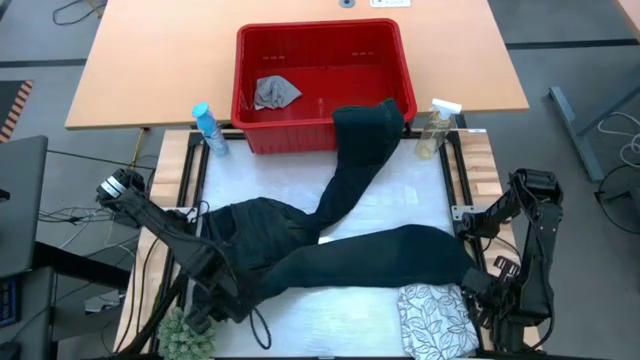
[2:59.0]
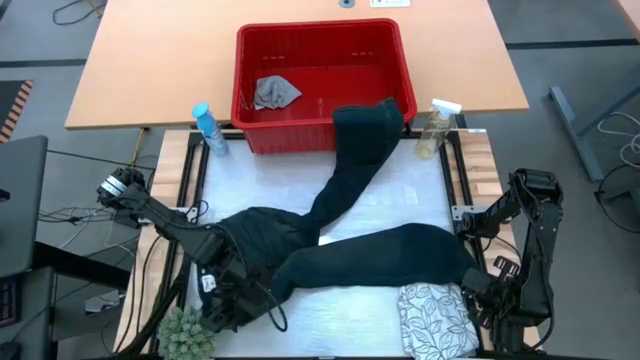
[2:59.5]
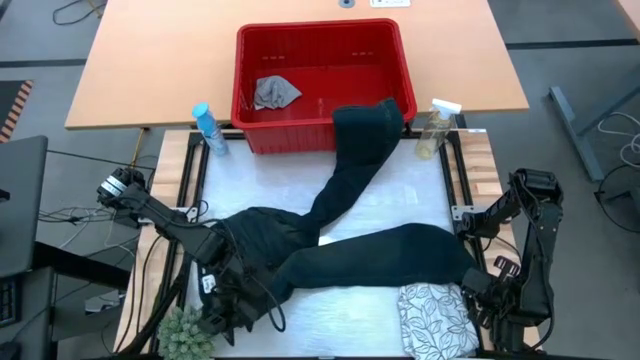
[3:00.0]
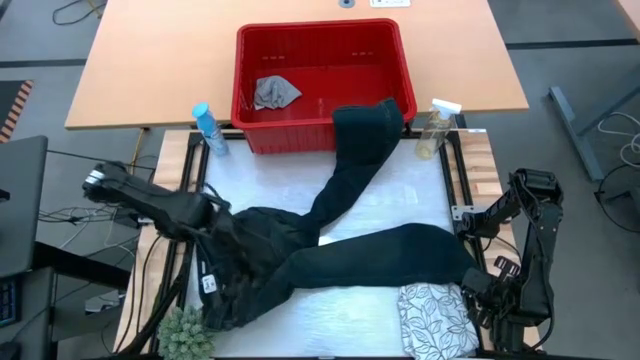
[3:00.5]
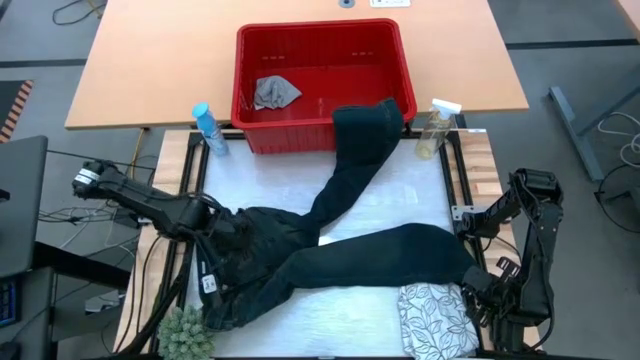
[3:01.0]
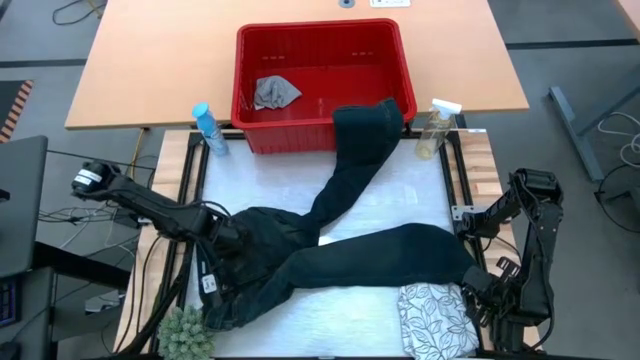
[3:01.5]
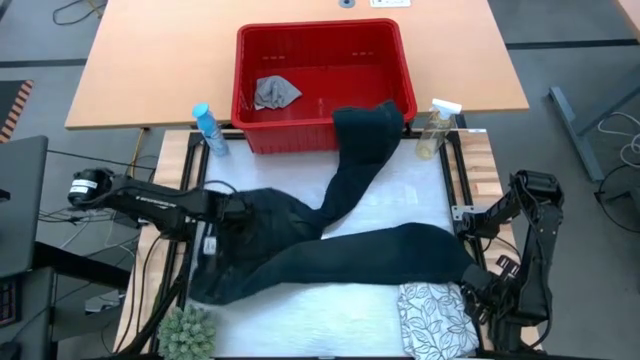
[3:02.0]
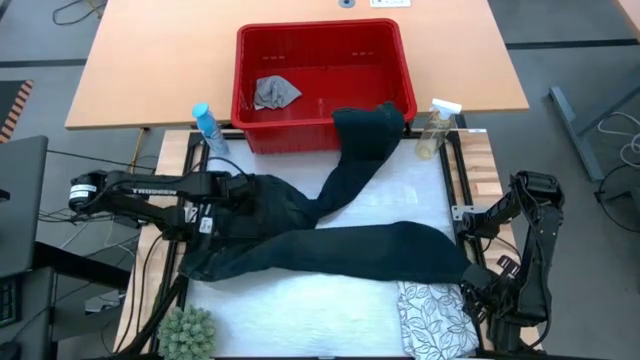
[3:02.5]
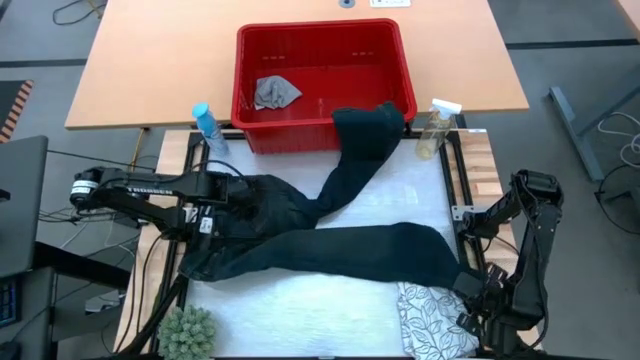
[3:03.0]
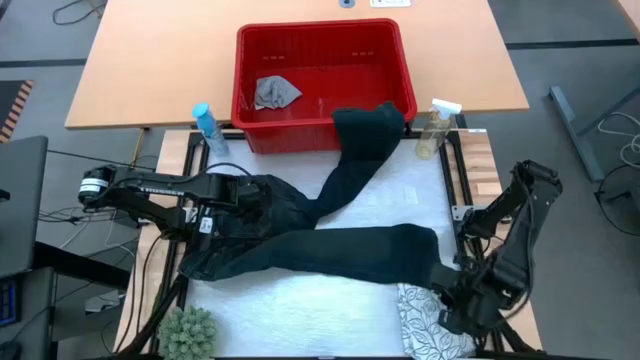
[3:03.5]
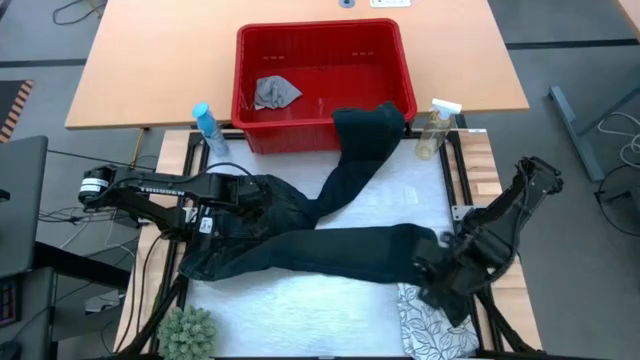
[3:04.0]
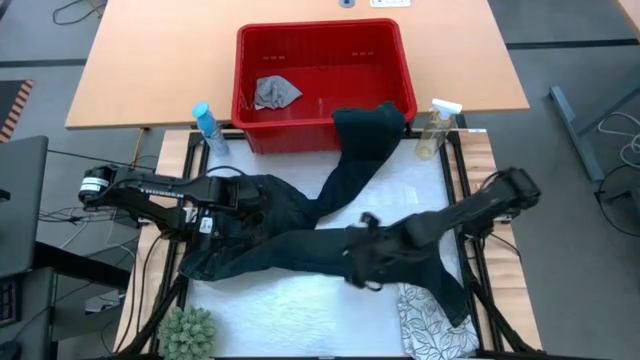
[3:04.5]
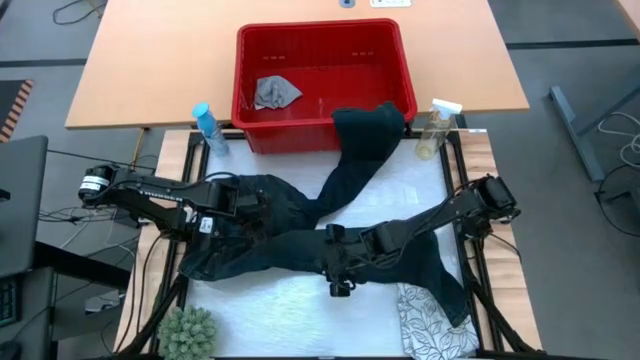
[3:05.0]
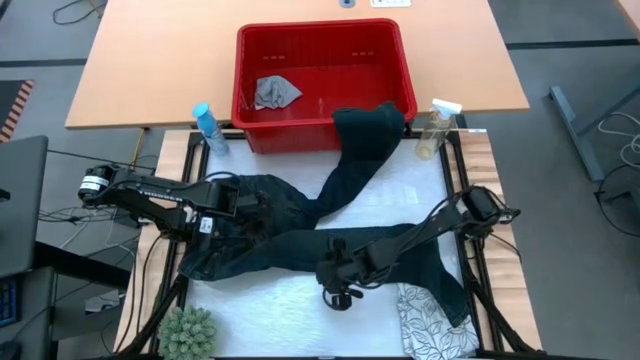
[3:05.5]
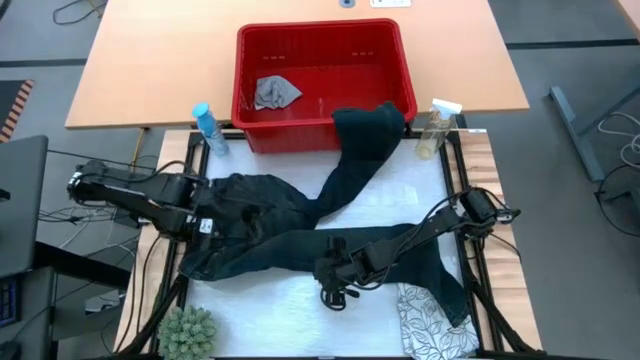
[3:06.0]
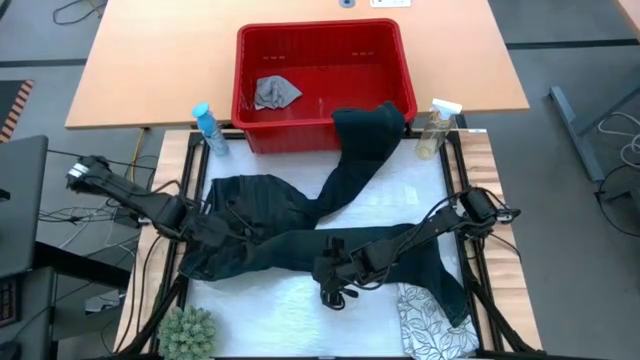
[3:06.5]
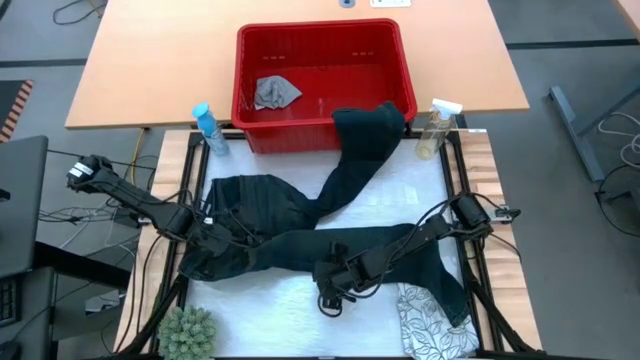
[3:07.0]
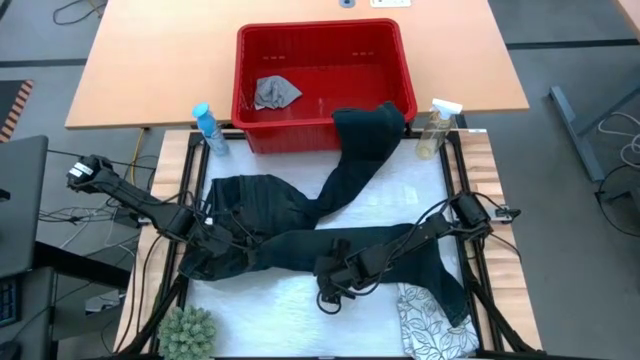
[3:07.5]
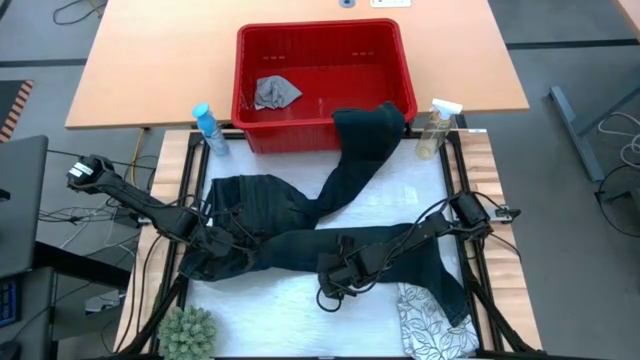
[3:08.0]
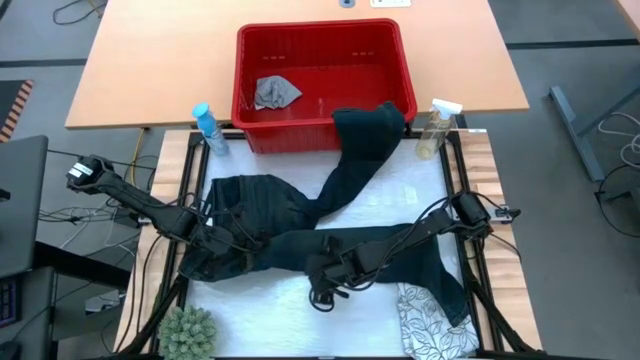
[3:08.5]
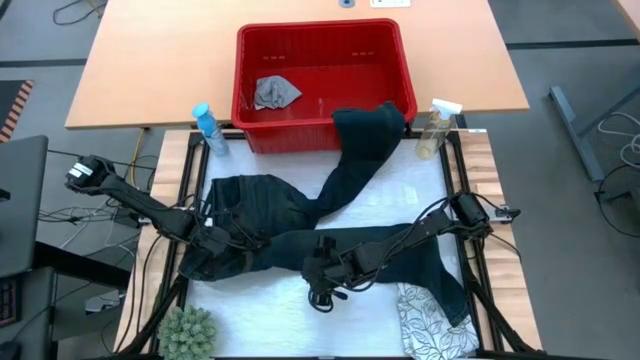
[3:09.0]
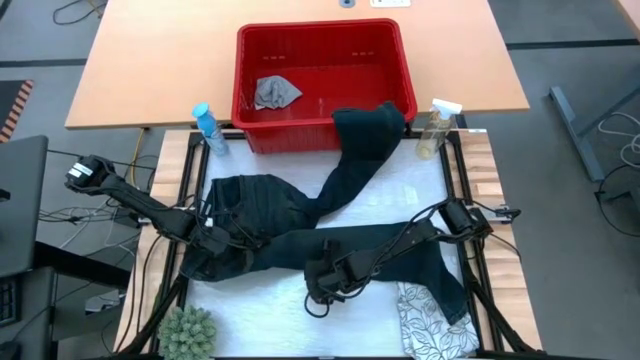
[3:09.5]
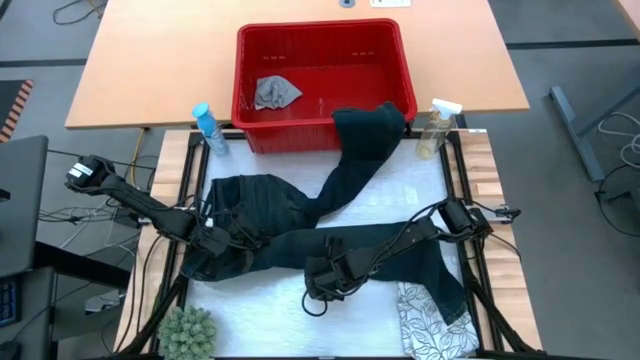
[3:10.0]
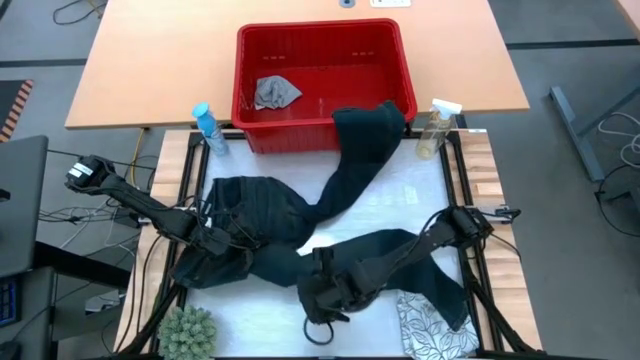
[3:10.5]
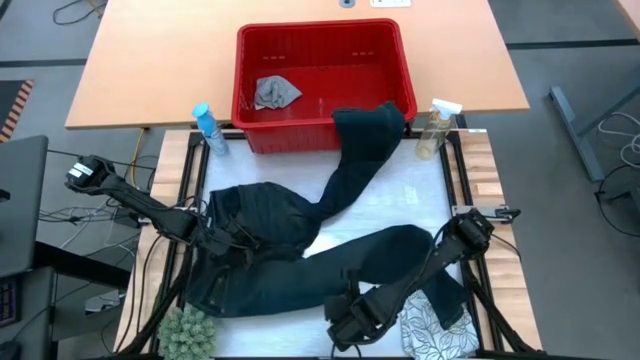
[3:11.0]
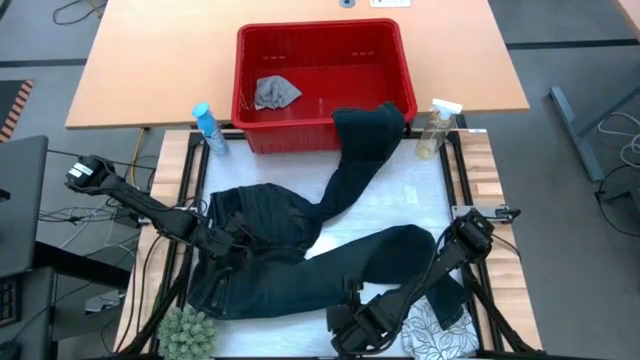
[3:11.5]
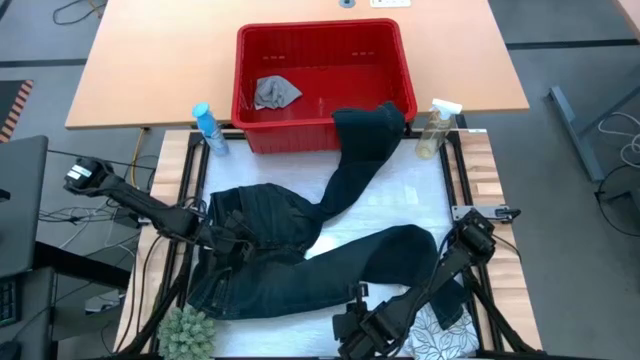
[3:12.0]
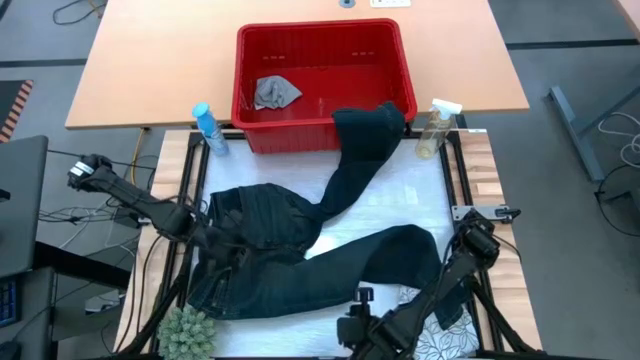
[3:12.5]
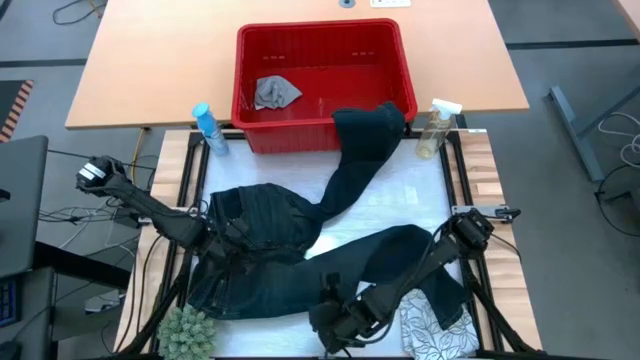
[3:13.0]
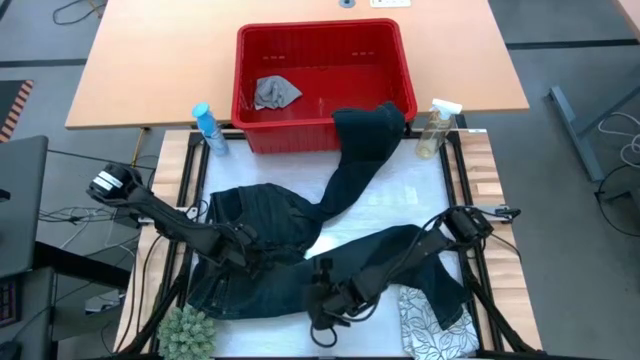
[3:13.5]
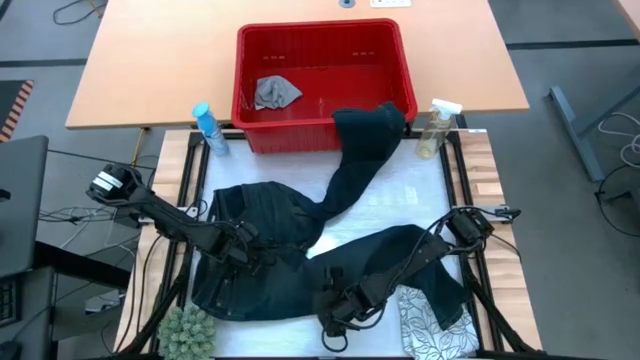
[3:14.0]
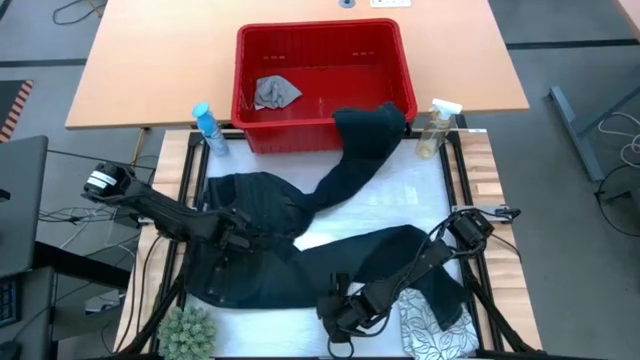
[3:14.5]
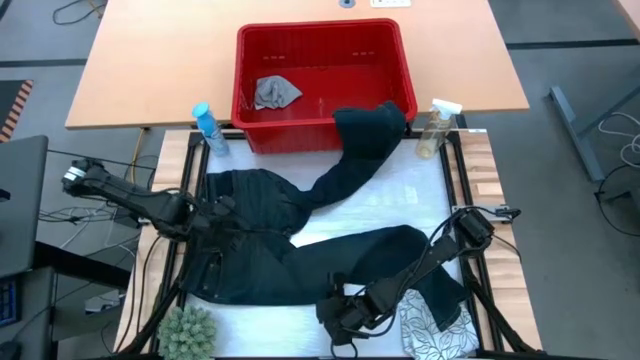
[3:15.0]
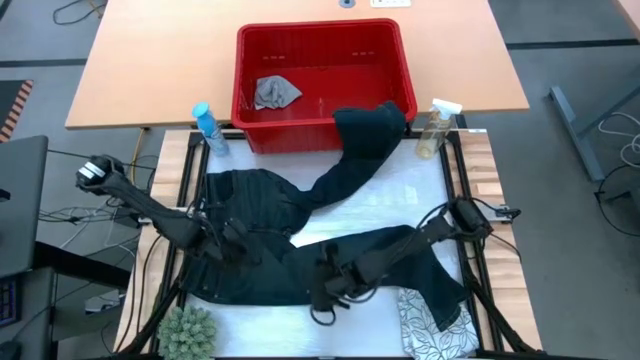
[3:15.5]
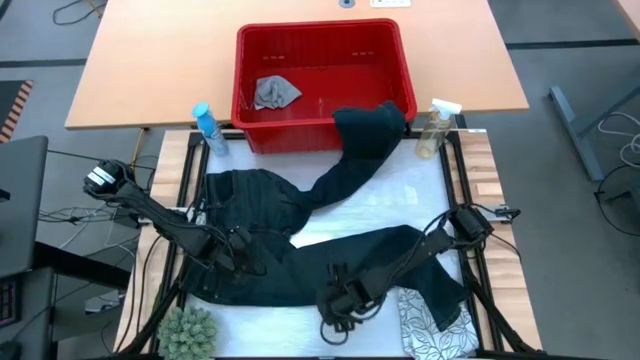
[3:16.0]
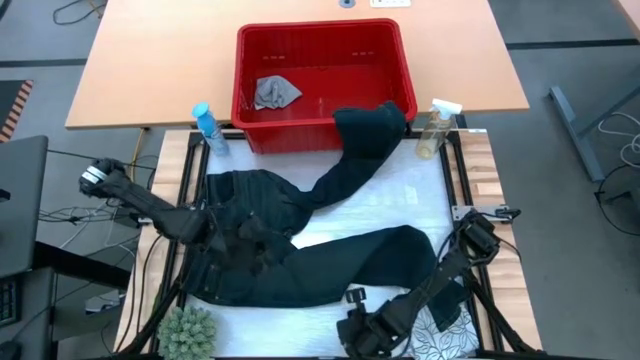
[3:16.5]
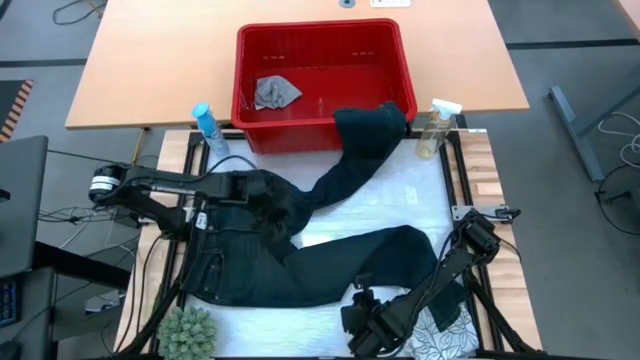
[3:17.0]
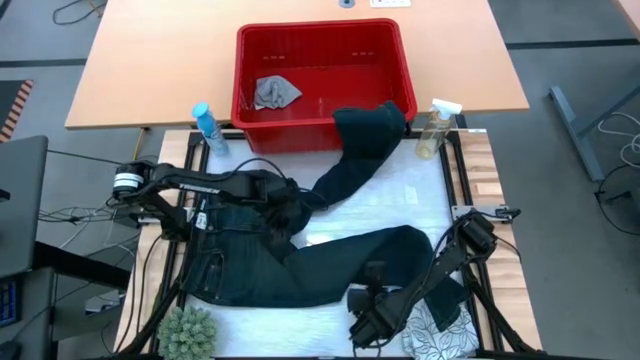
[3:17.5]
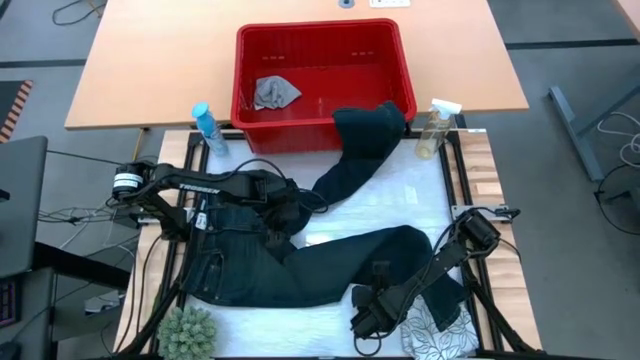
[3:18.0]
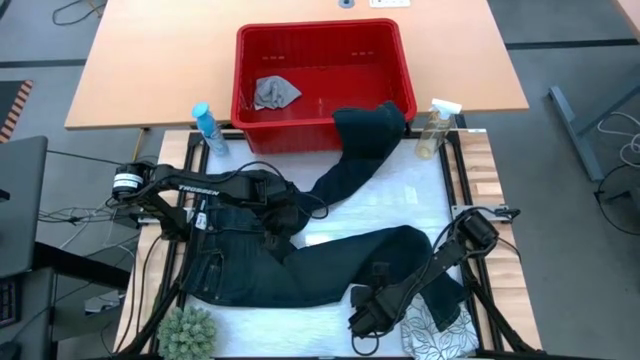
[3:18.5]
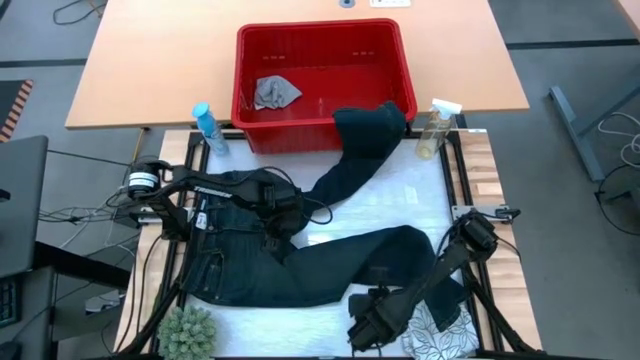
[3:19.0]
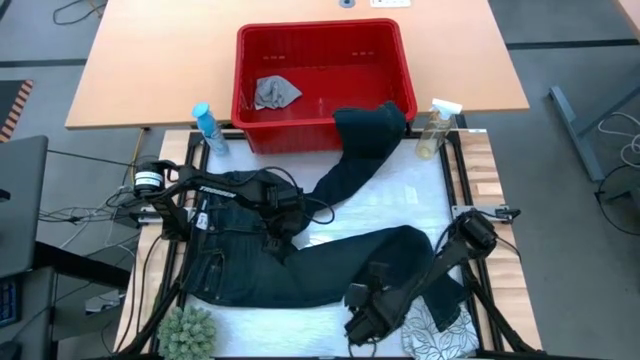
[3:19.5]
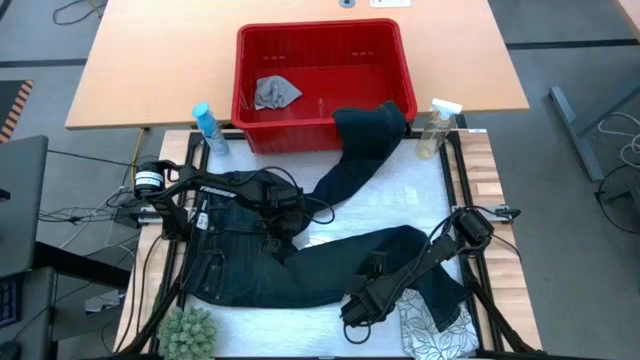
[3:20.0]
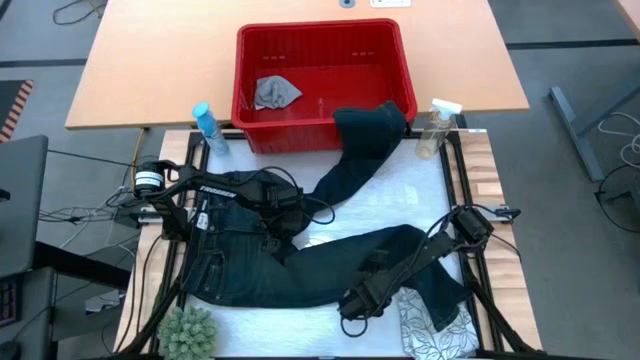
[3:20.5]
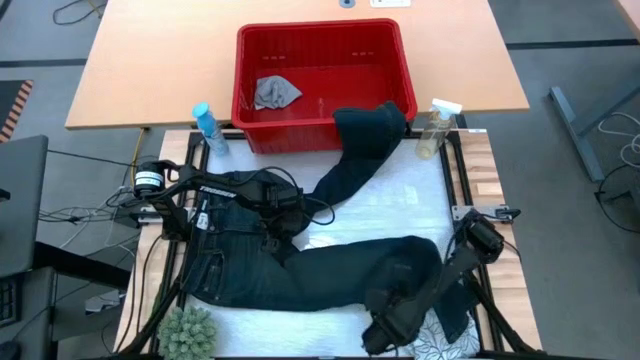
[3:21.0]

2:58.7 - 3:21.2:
Task: Fold laundry
Fold the dark blue pants
